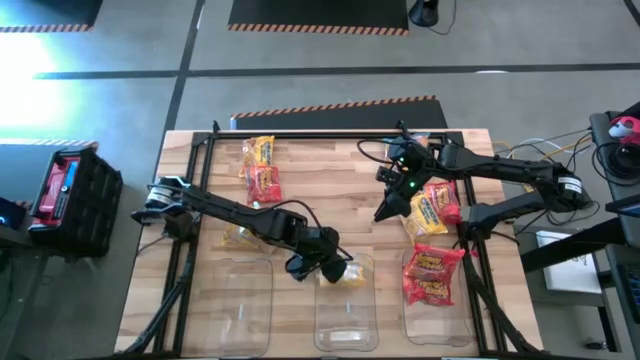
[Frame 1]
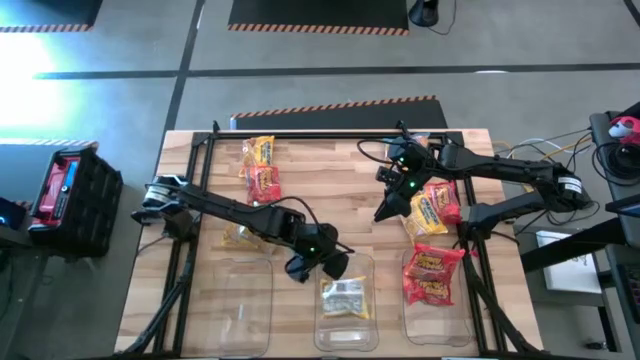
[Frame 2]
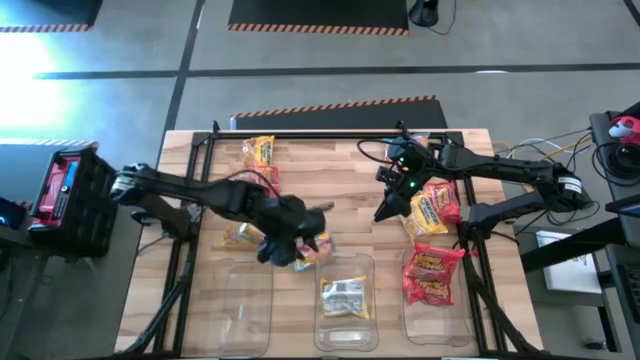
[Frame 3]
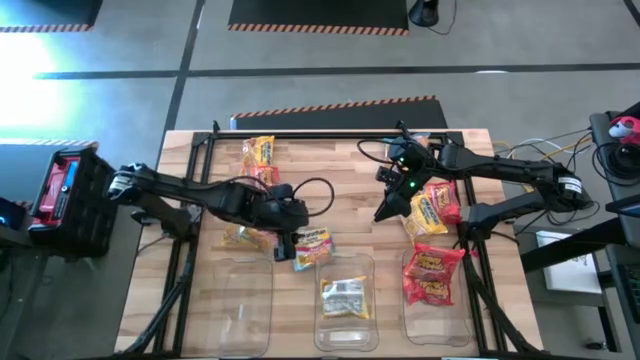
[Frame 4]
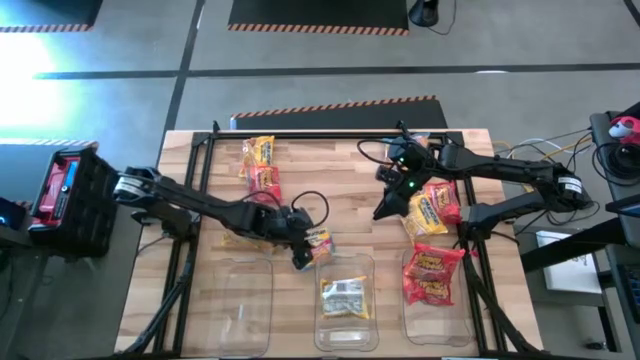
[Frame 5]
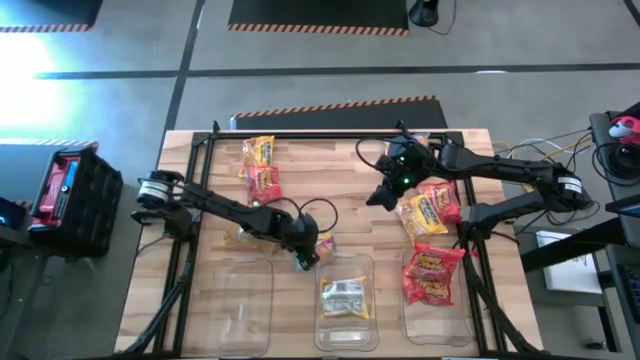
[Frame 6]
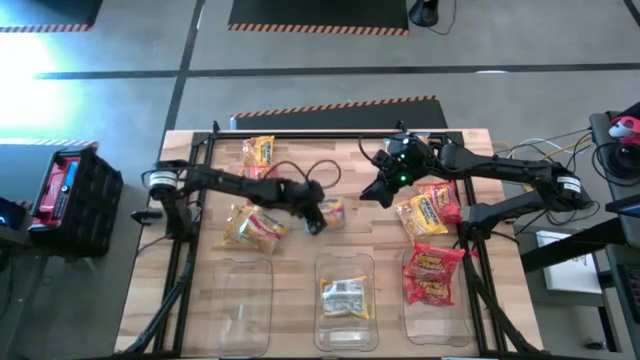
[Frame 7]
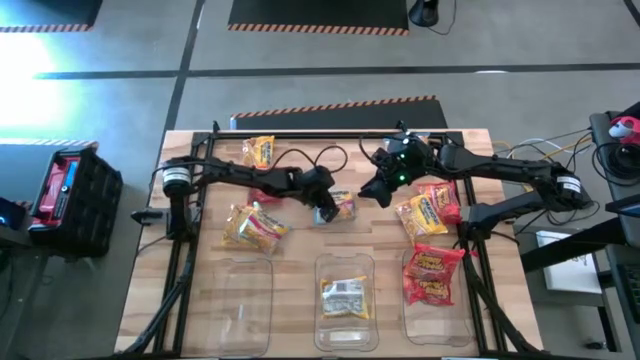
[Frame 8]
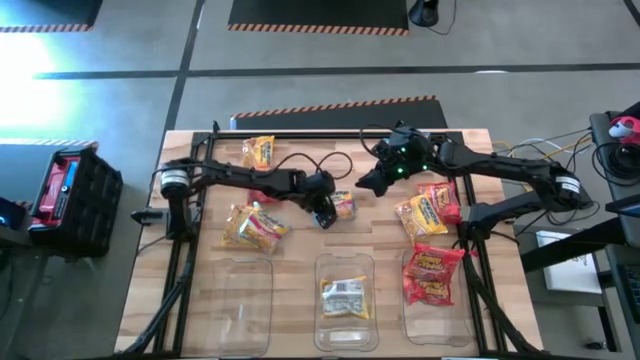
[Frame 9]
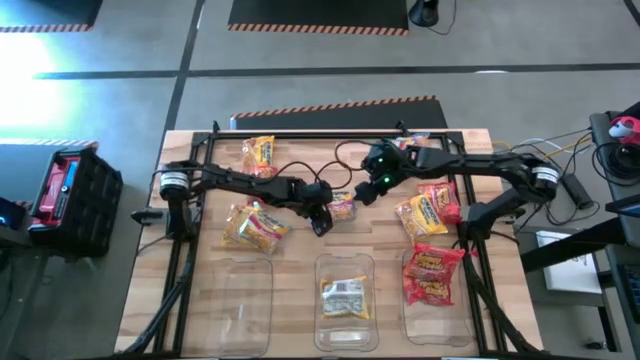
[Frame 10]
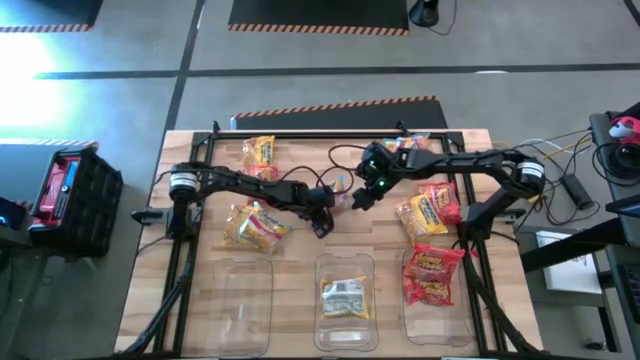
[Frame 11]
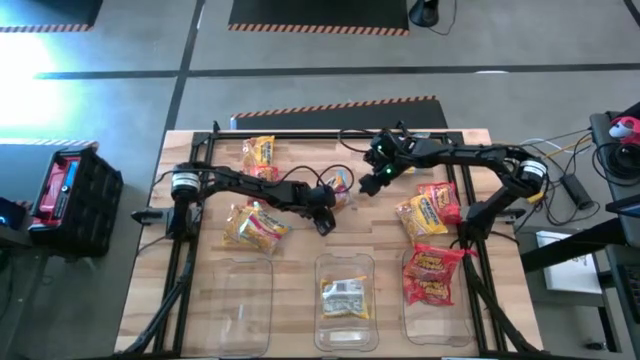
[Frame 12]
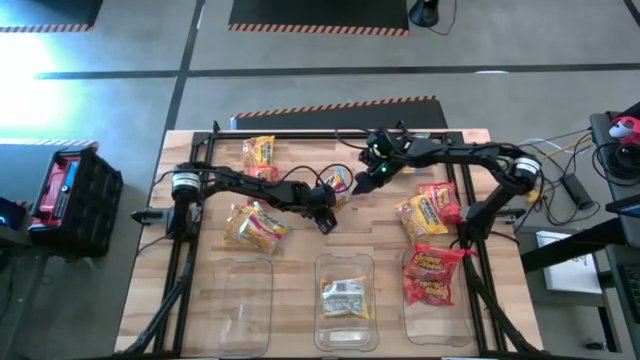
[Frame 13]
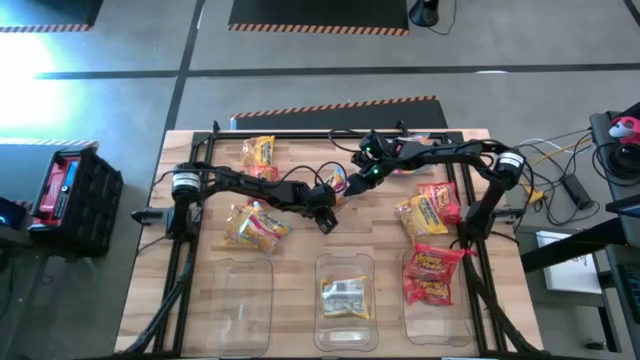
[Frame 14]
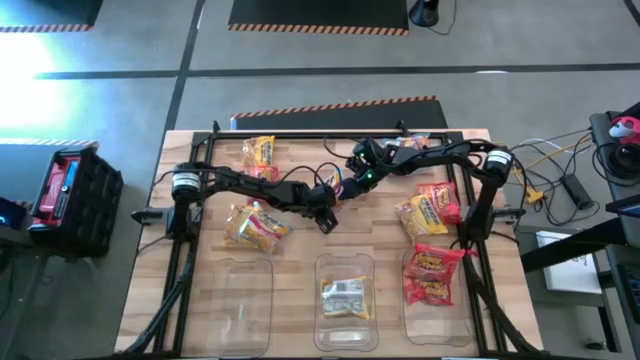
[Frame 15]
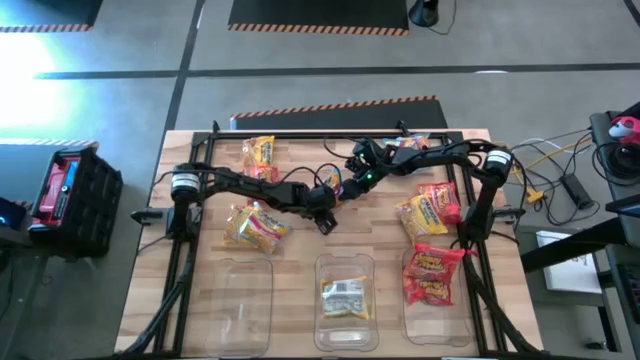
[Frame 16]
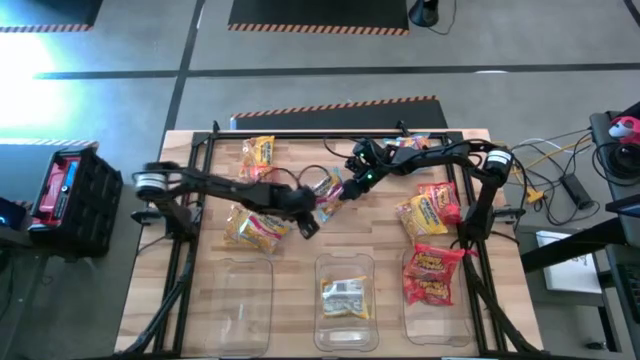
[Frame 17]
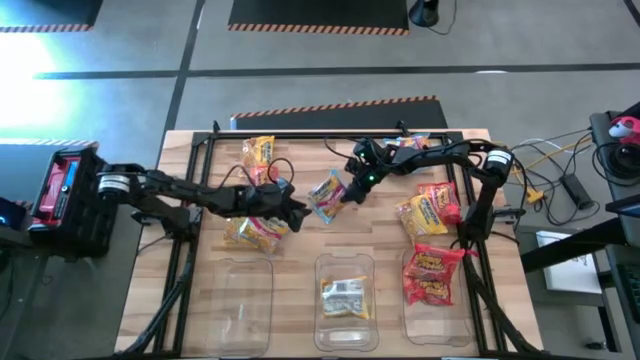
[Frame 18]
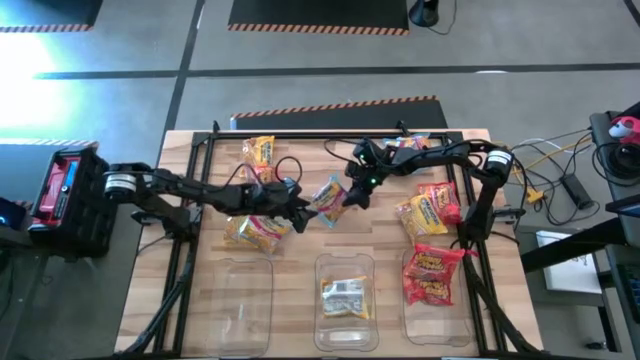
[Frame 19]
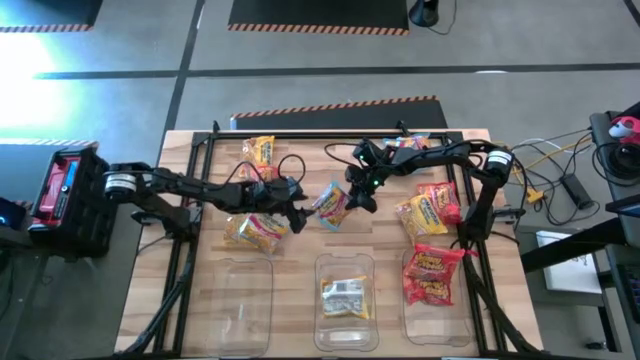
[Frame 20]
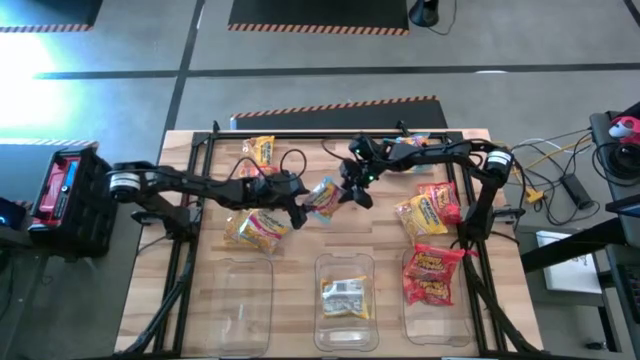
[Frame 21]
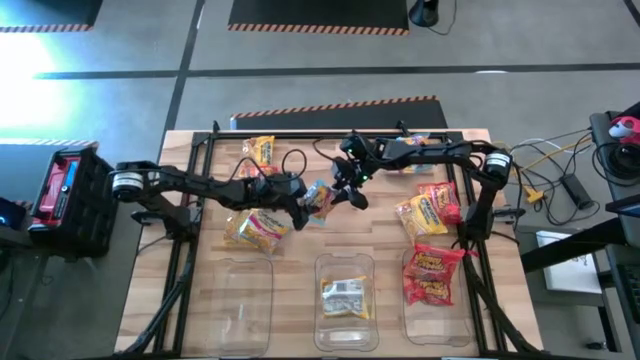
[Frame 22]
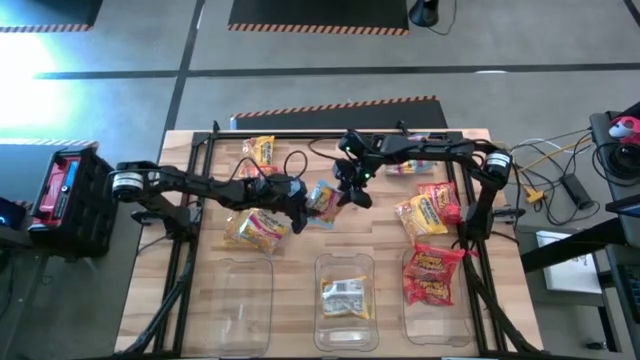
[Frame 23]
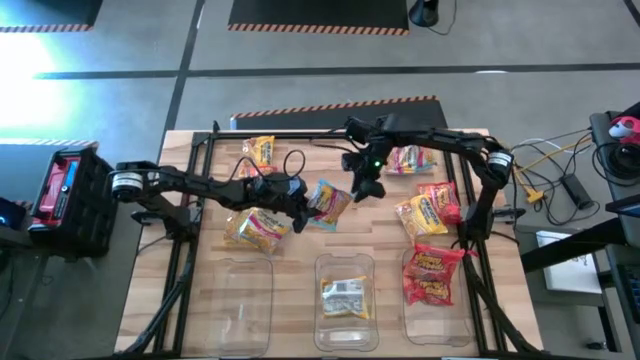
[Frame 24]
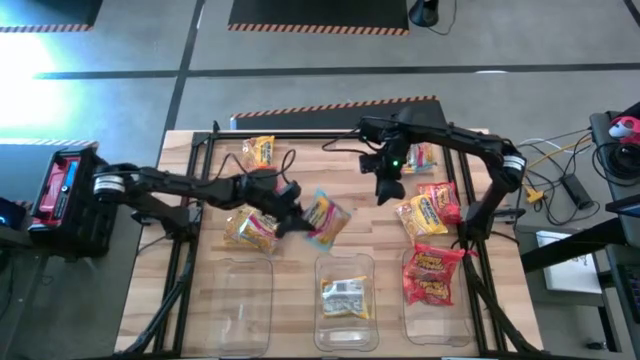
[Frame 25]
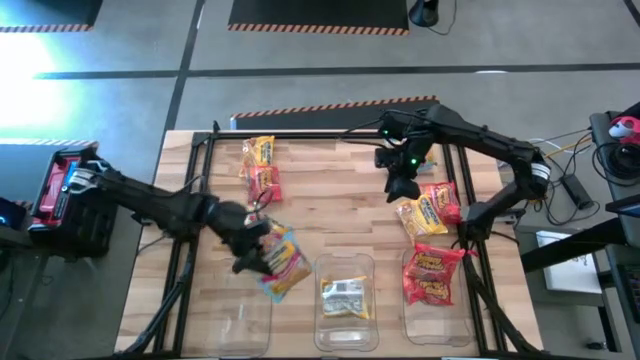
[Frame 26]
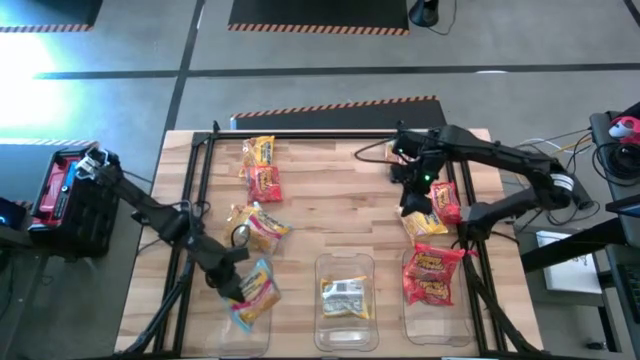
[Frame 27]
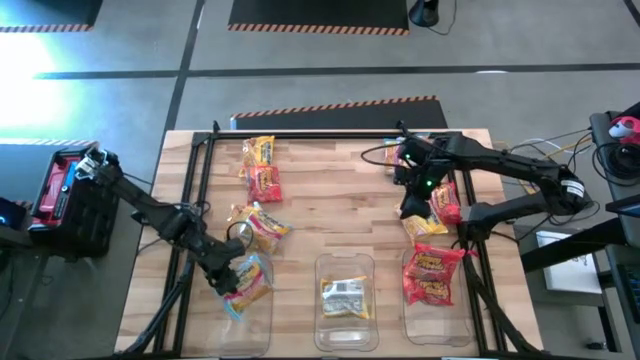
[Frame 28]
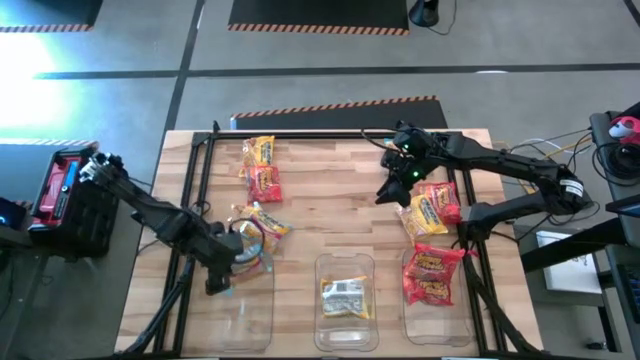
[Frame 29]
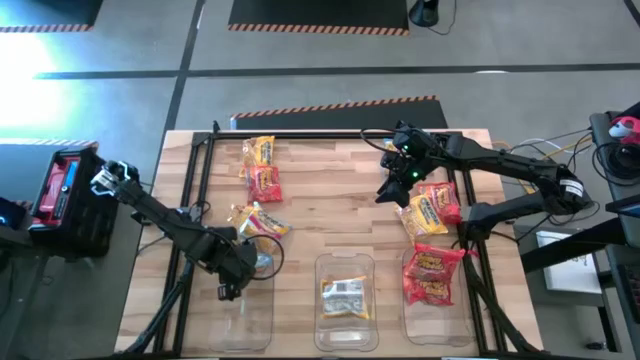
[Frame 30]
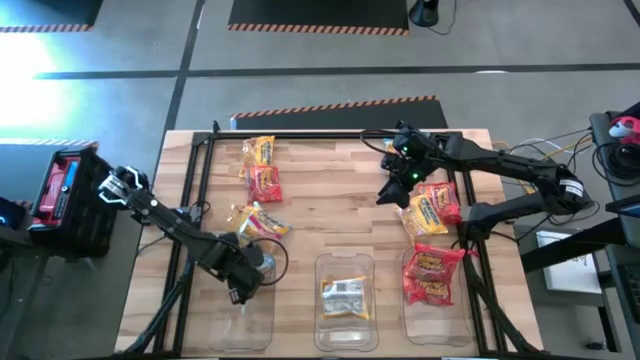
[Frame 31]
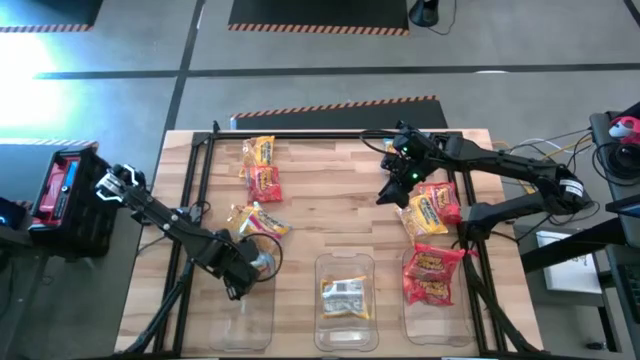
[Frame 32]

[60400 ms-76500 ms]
Task: Sort Maruchan noodles
Put the blue noodle pack into the left transparent bin
